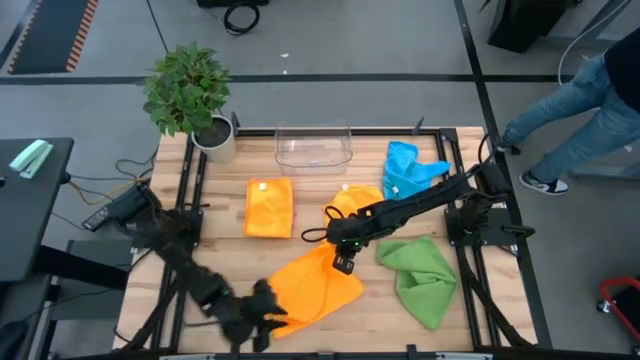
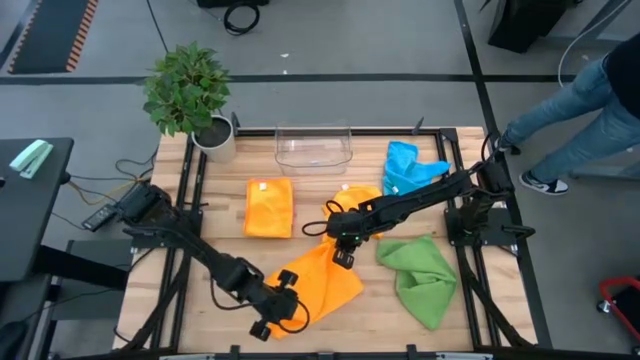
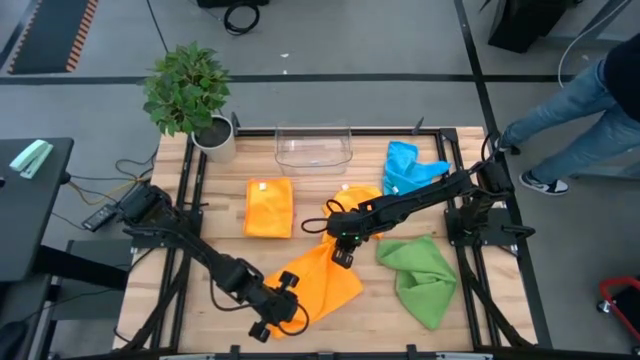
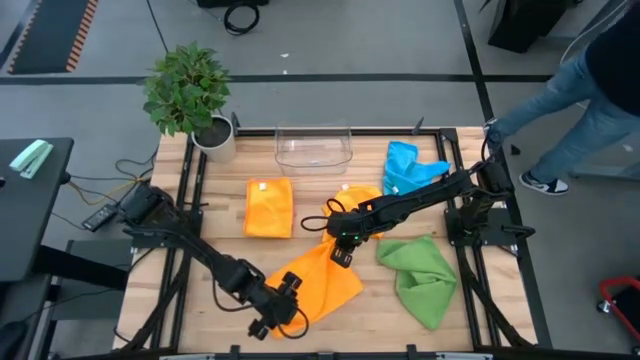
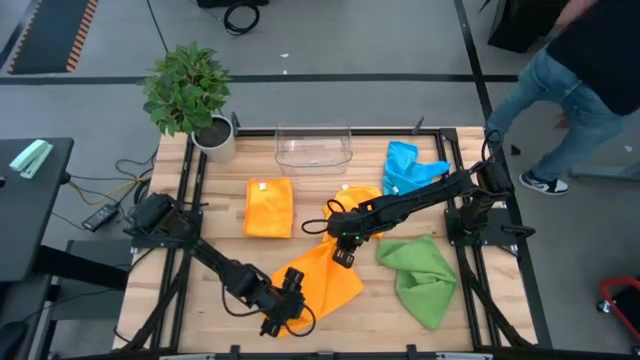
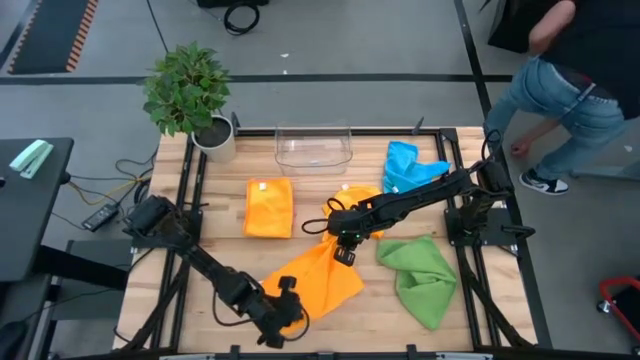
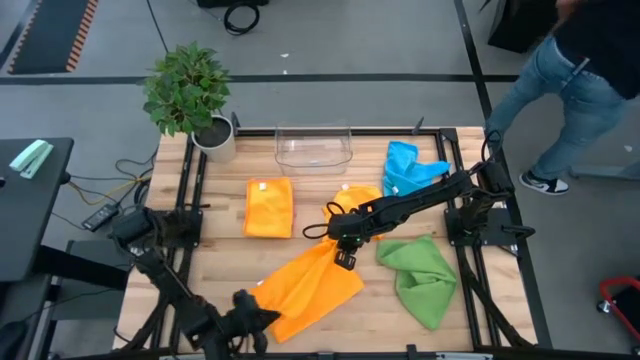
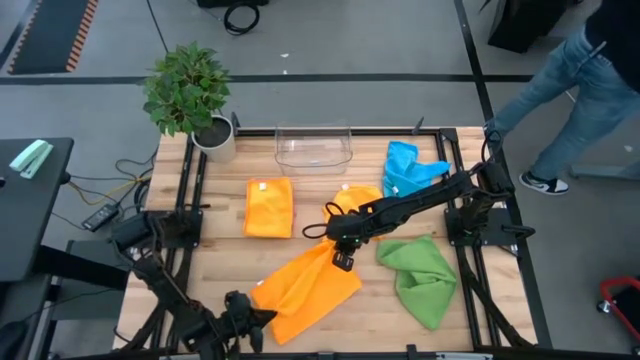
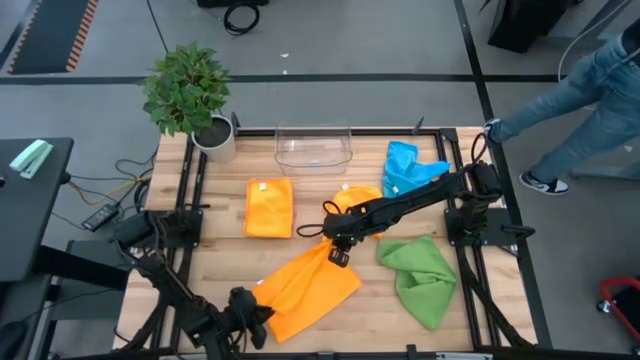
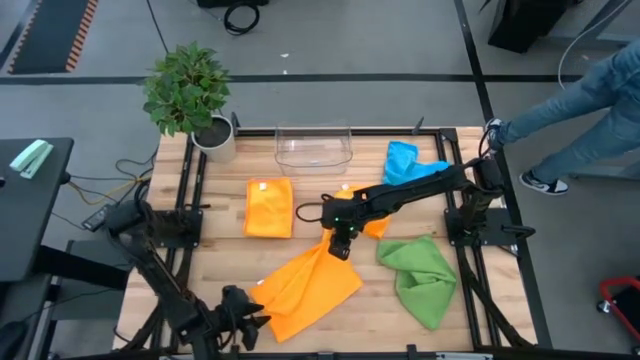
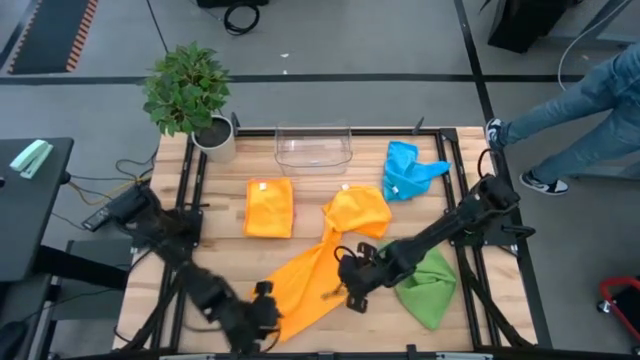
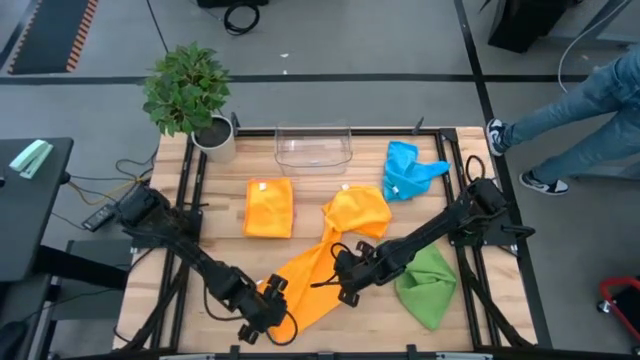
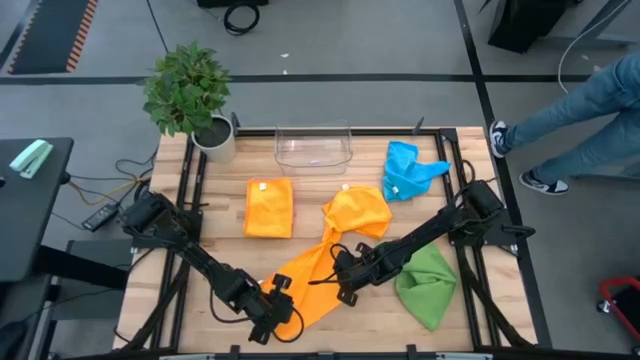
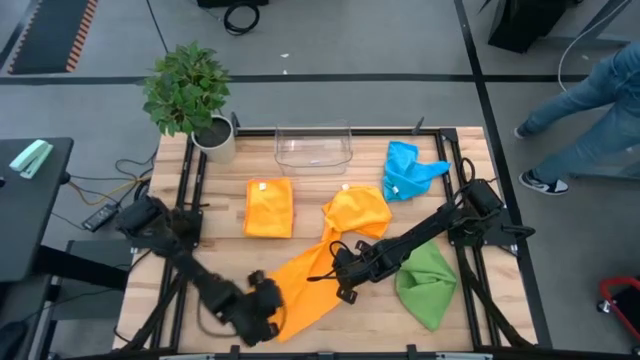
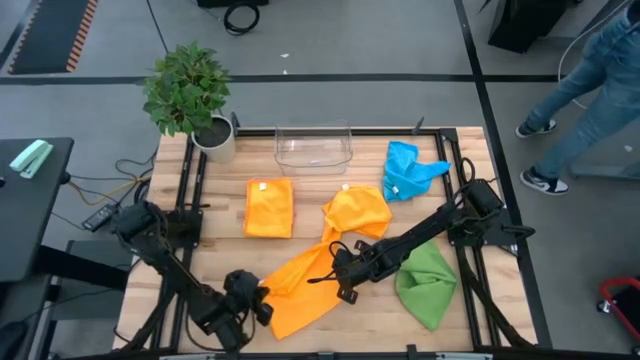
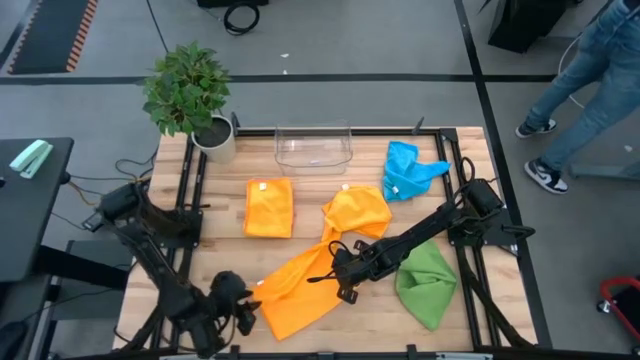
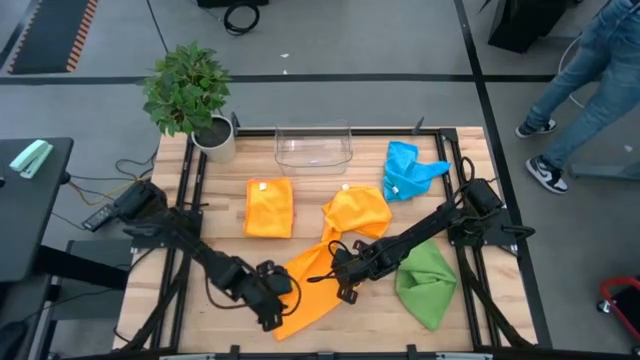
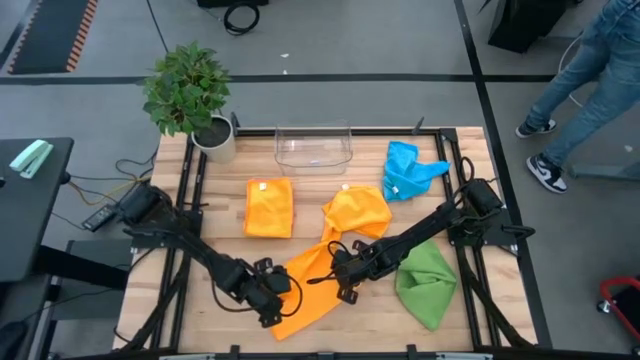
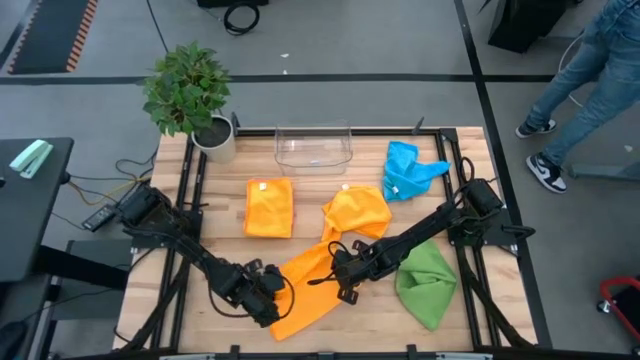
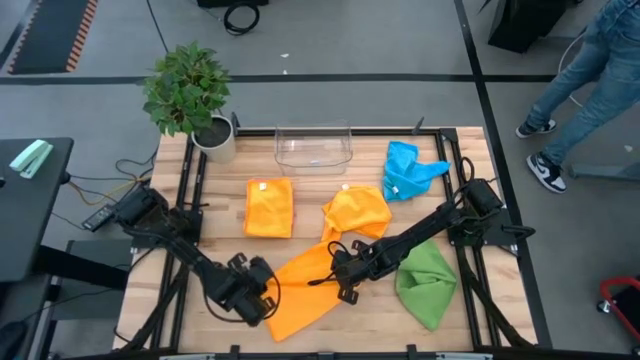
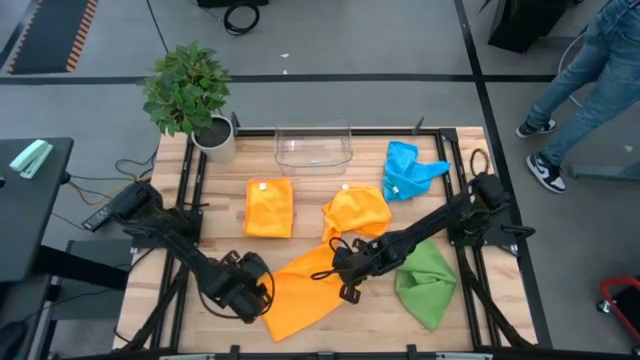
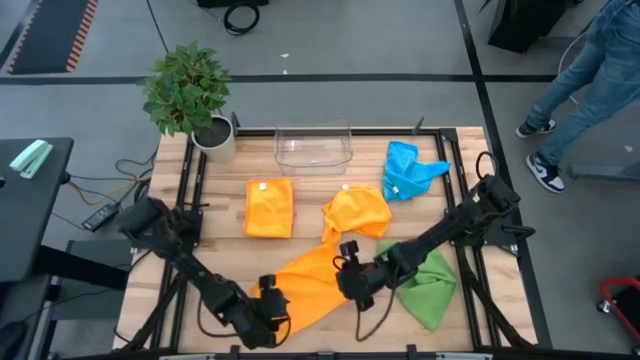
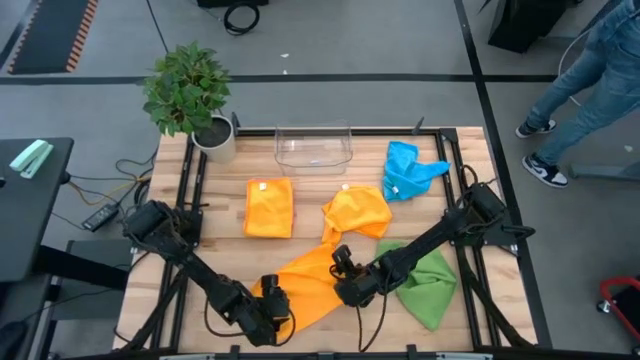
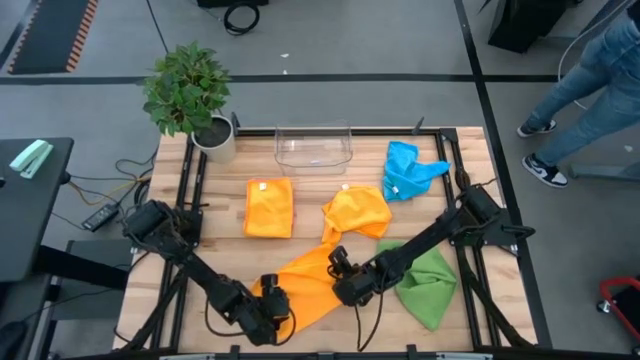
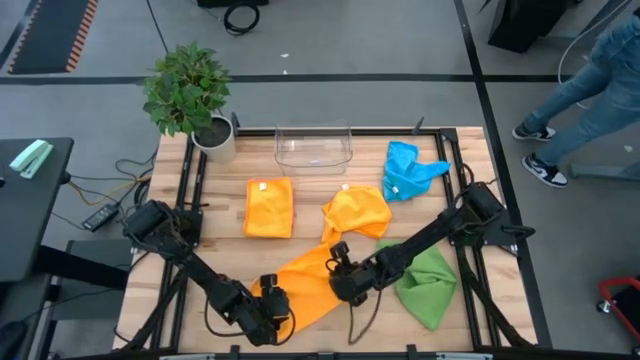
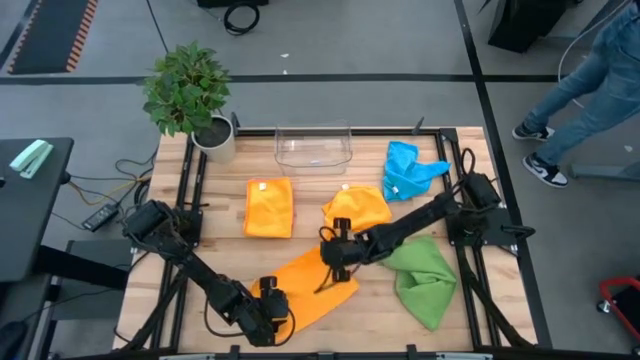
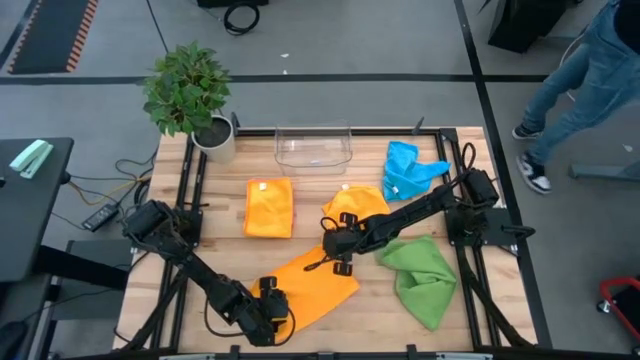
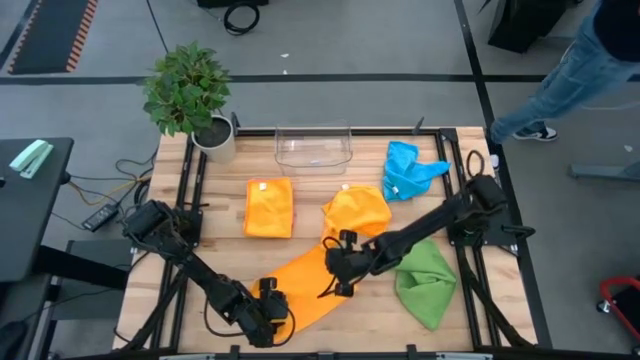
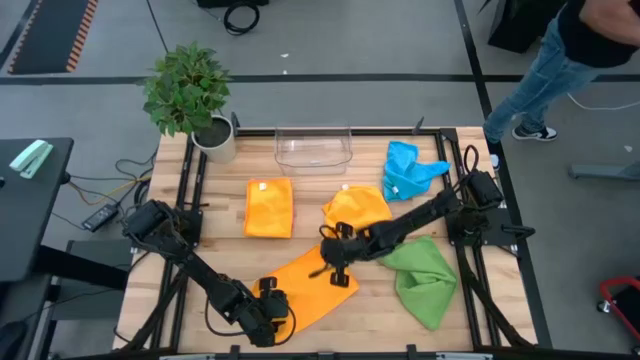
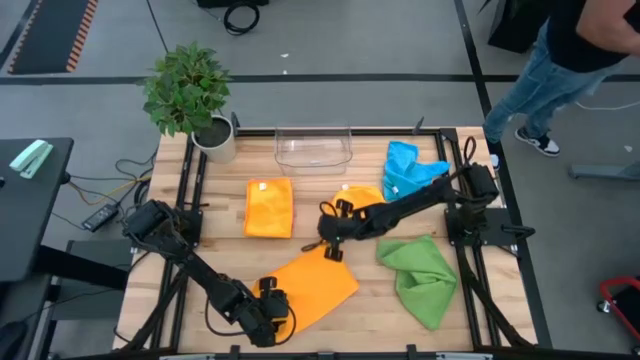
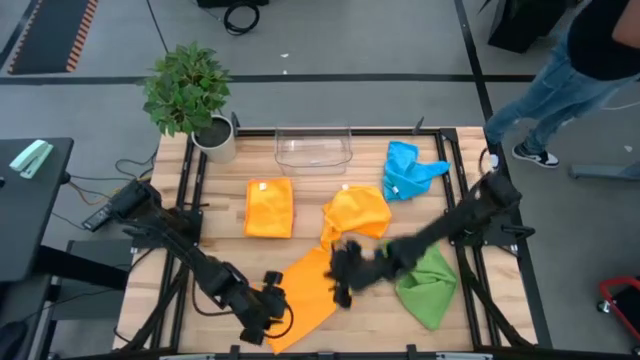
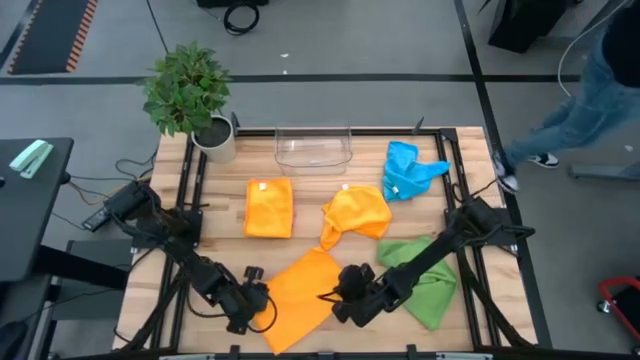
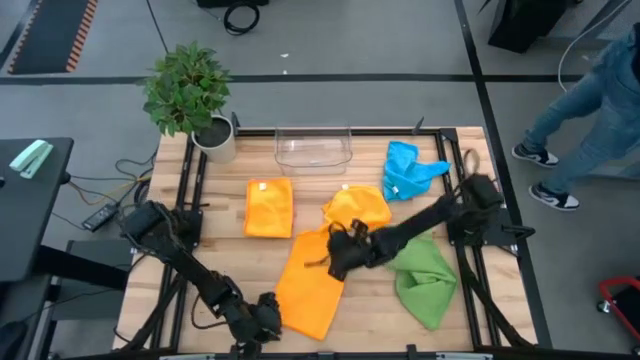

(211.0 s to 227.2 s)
Task: Fold microfiber towels
Fold the left orange microfiber cloth

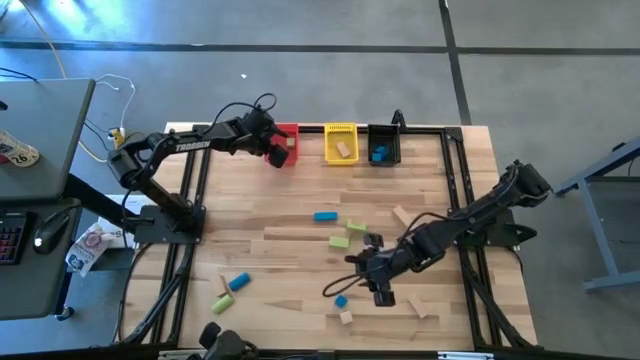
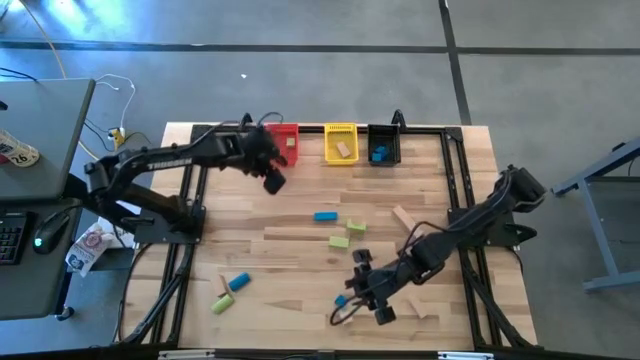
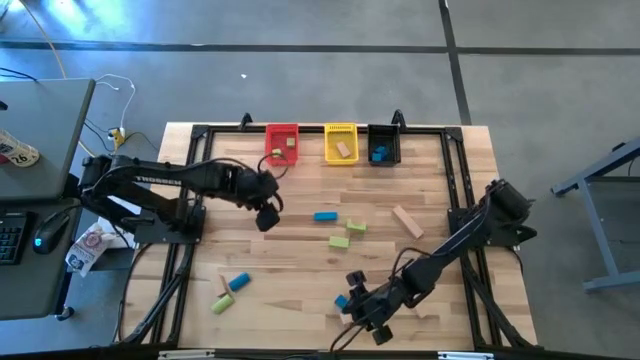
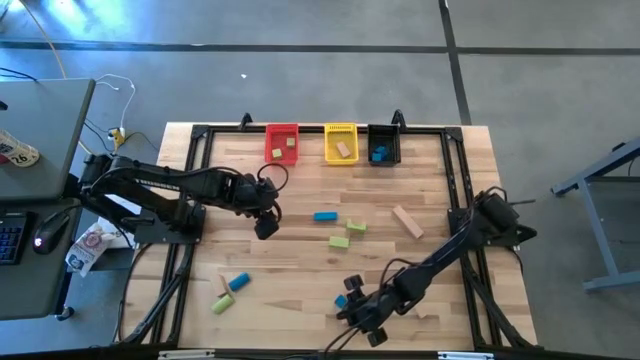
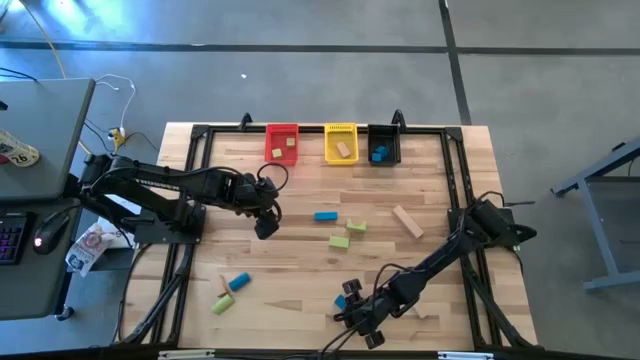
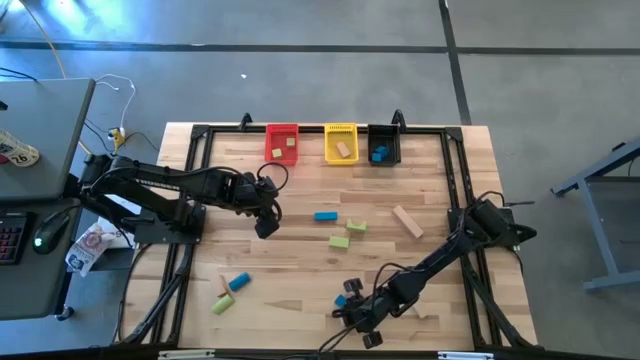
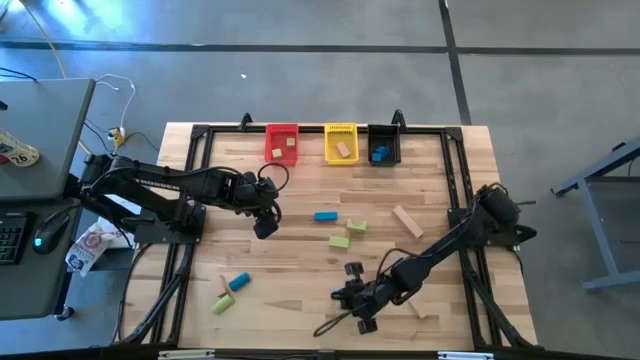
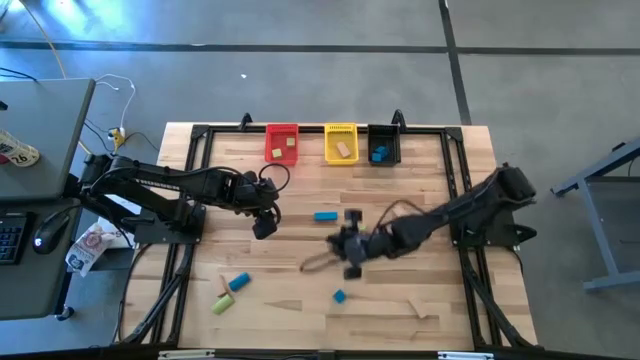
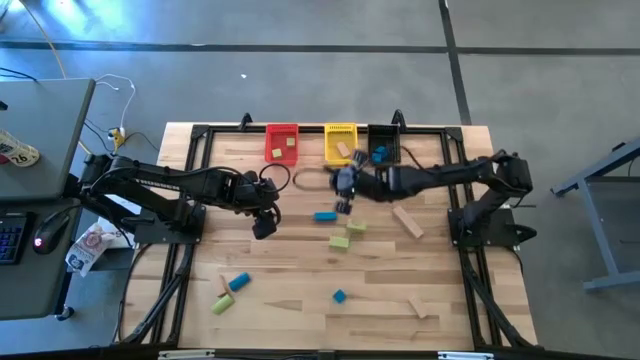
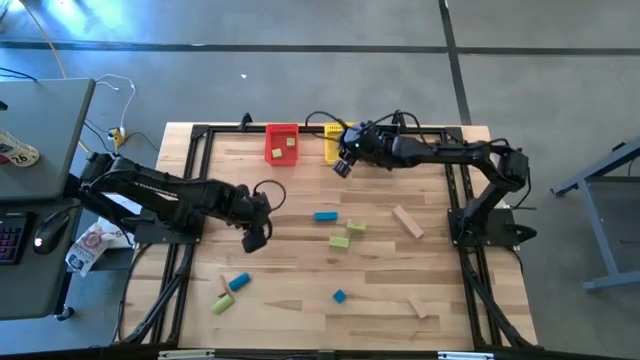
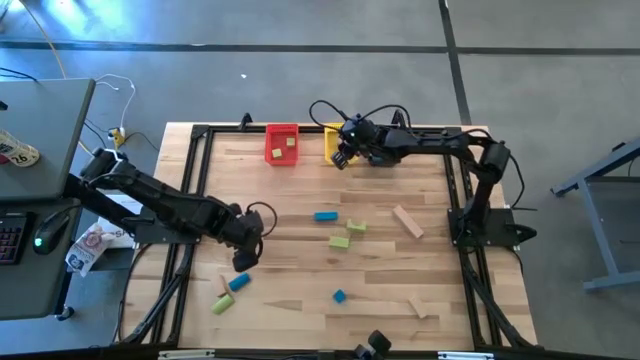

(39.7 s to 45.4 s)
Task: Sort & place blocks by color
Put the beige block into the yellow bin
